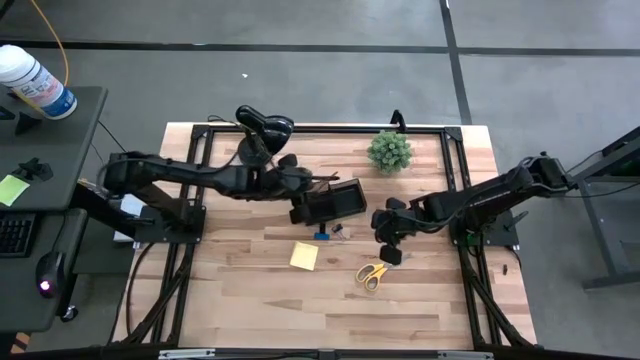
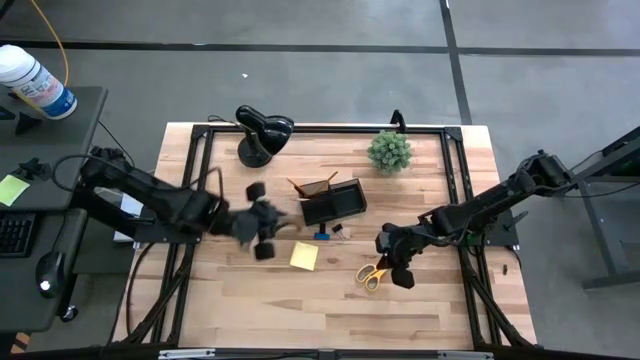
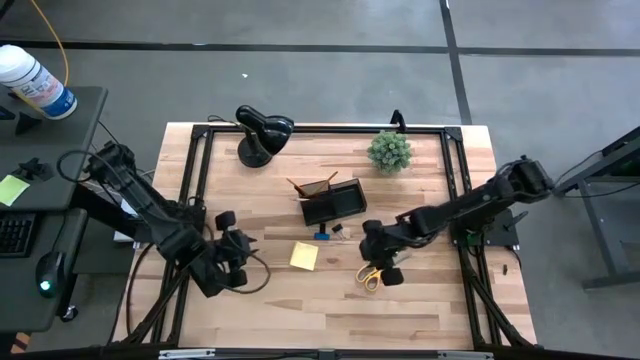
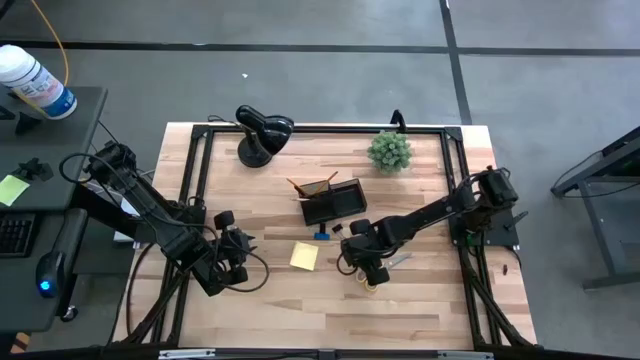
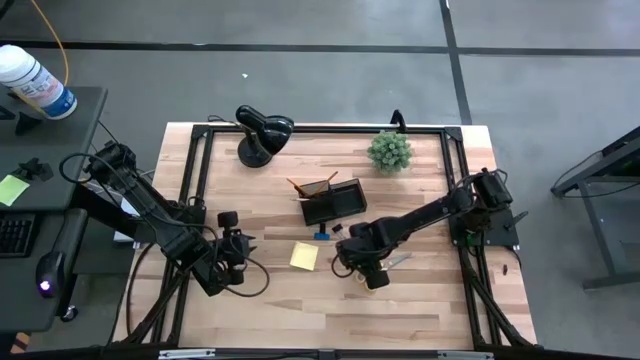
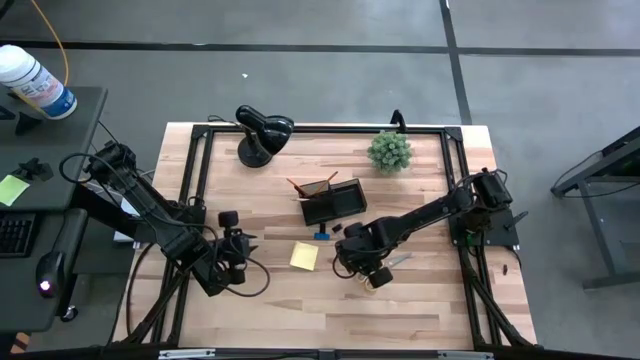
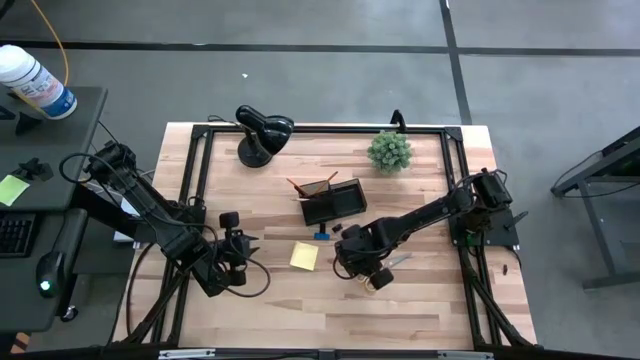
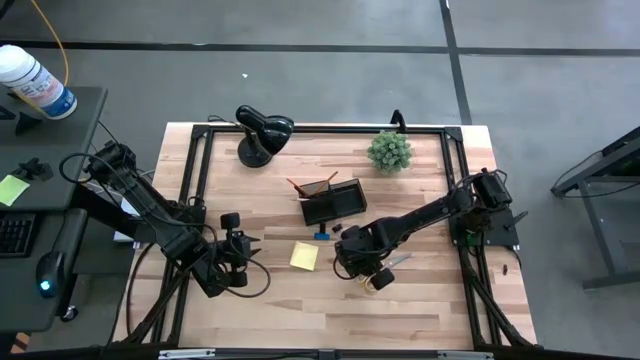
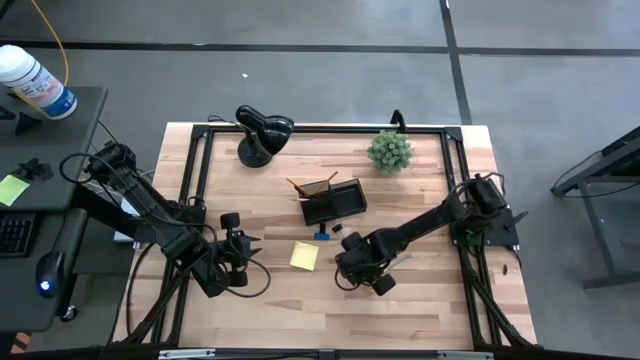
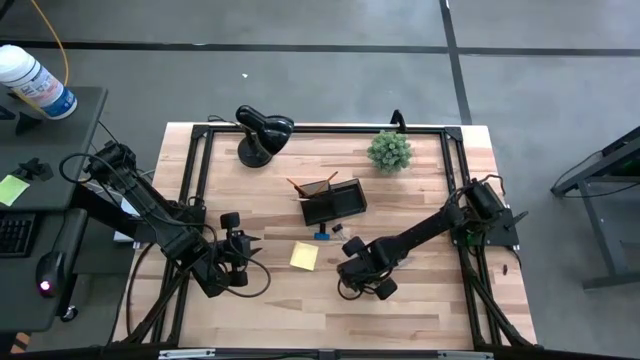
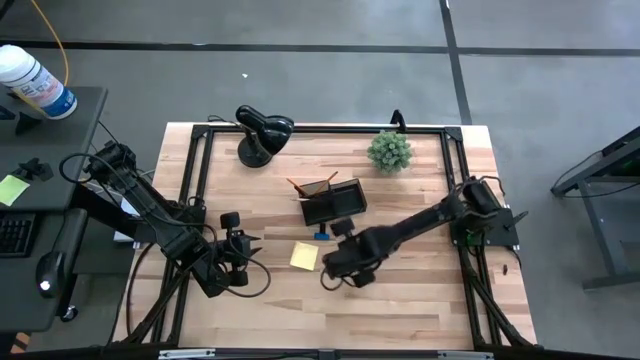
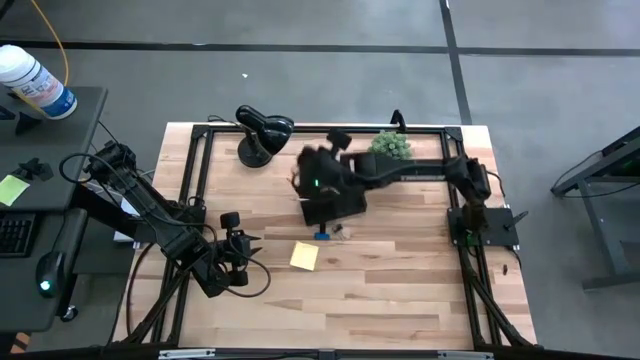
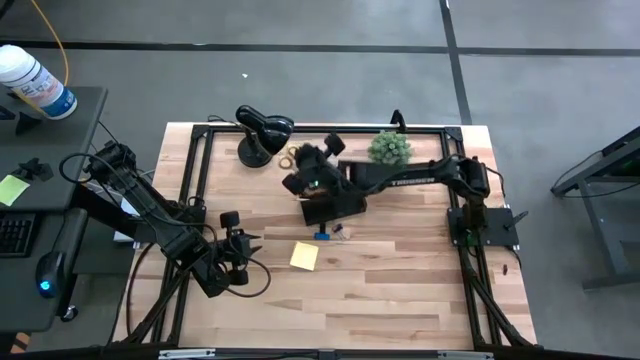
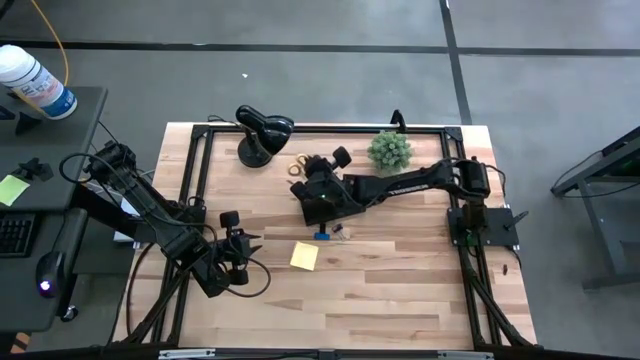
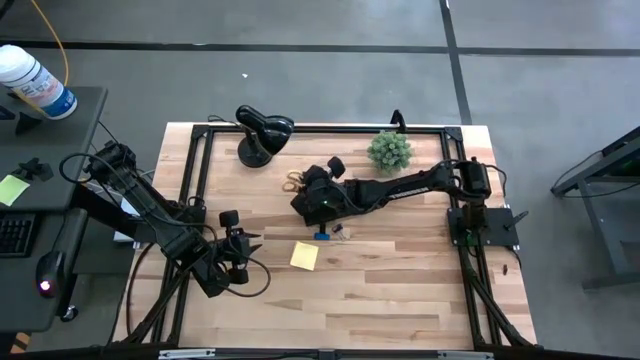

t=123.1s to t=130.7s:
Task: Pick and place office supplies into organizer
Put the yellow scissor into the black desk organizer

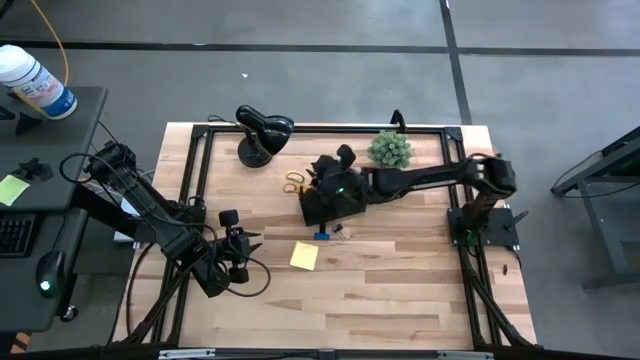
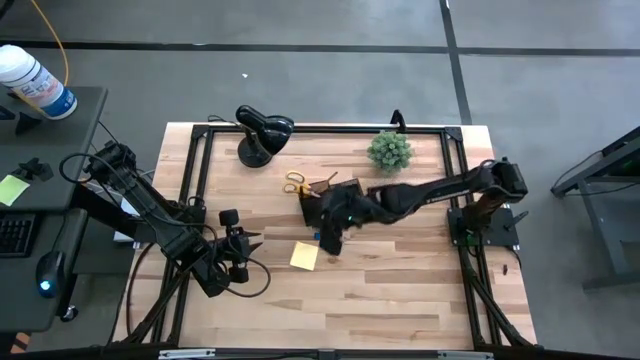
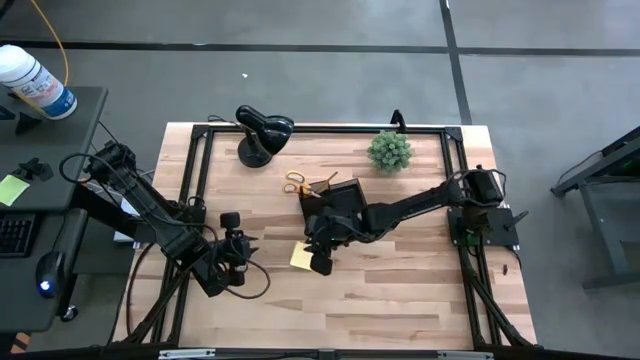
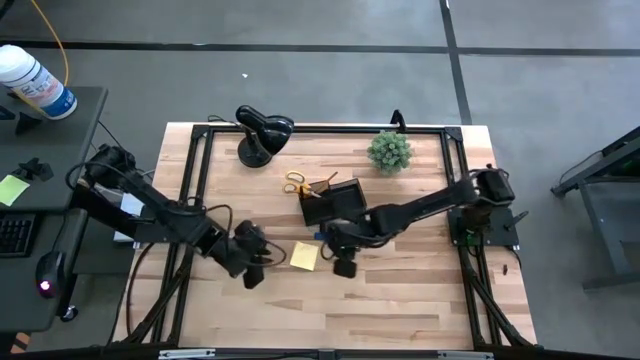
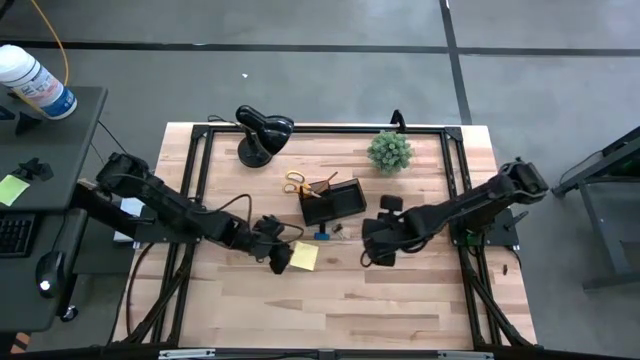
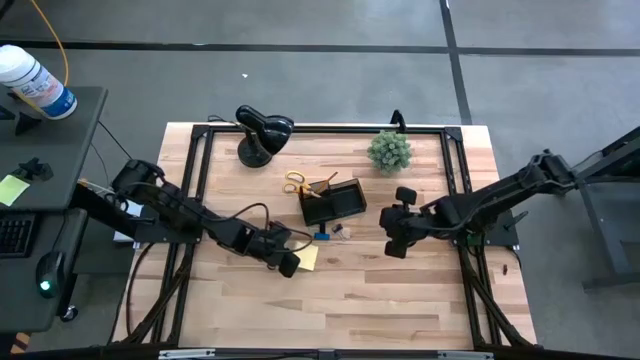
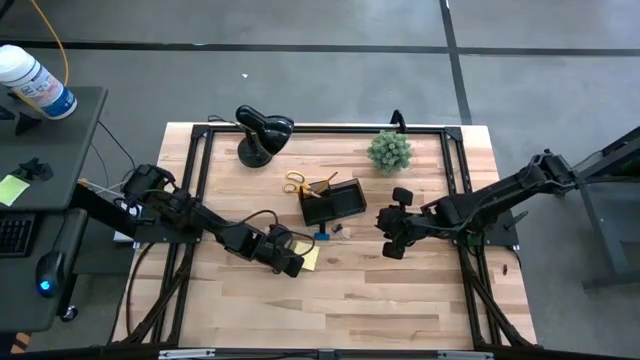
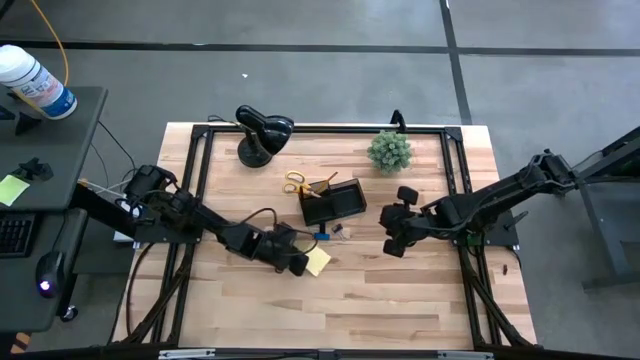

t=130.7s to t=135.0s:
Put the sticky notes into the black desk organizer

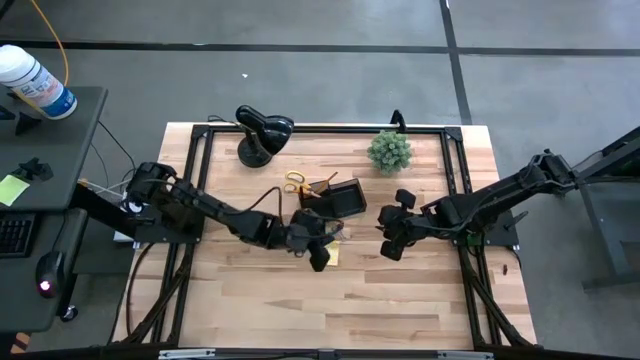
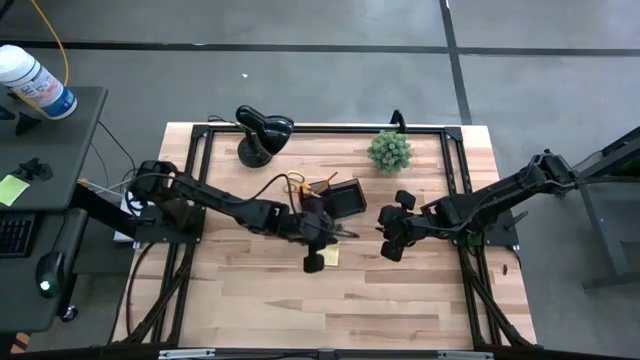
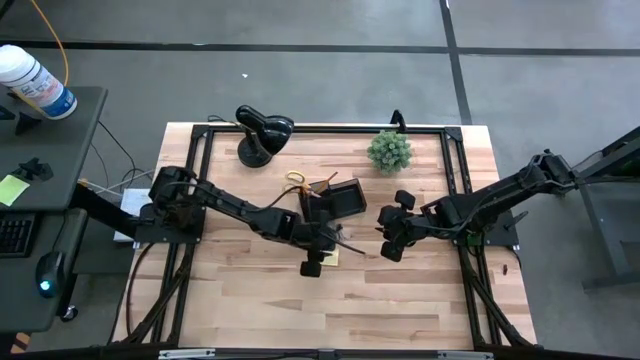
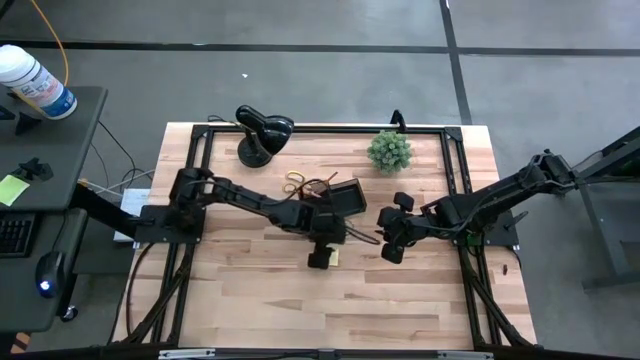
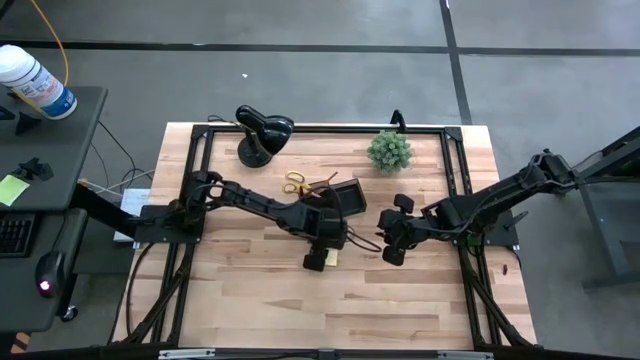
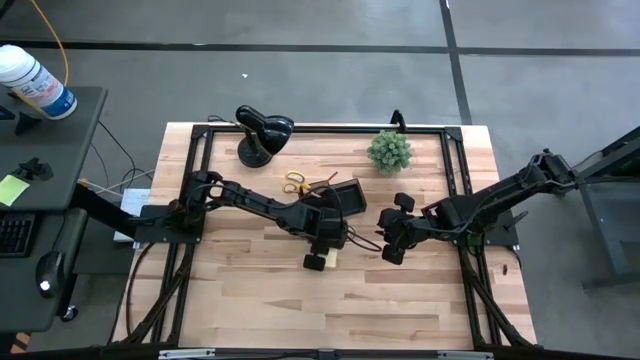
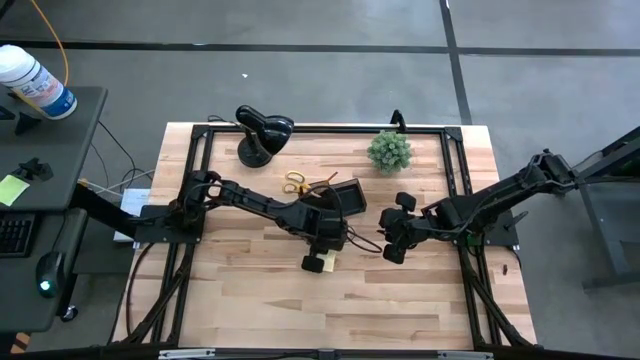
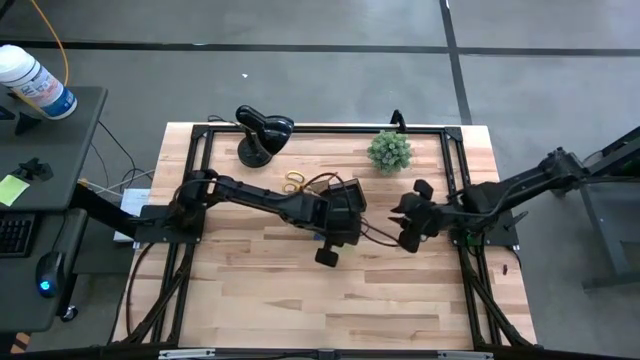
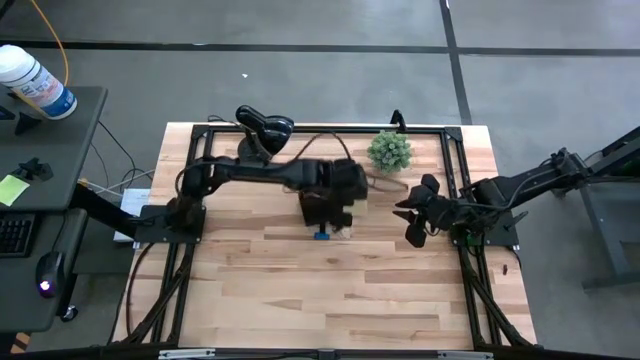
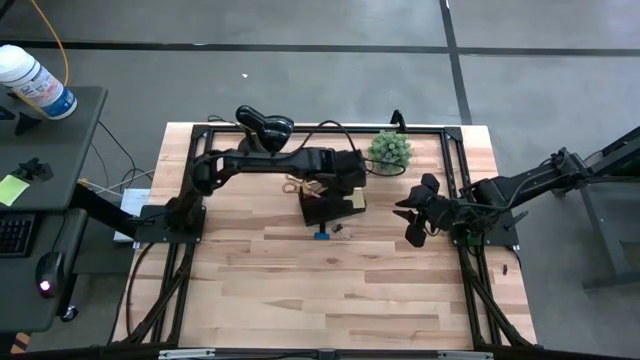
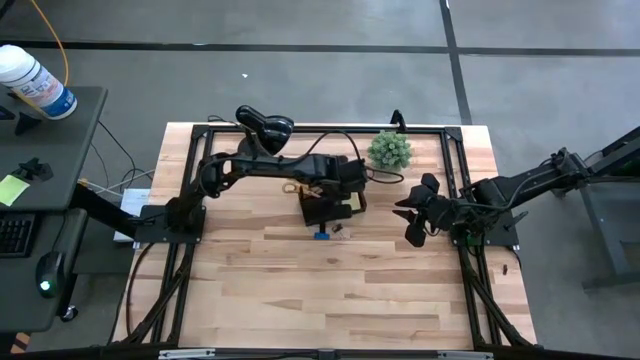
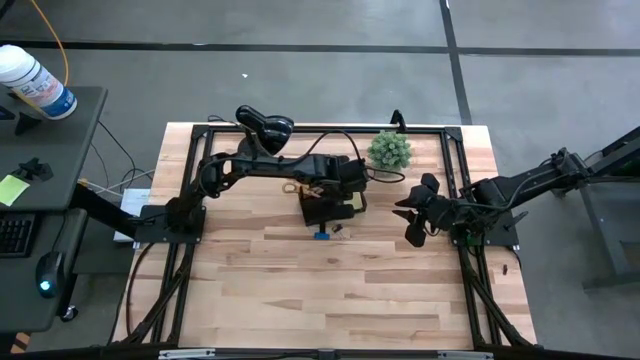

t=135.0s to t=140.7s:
Put the yellow sticky notes into the black desk organizer

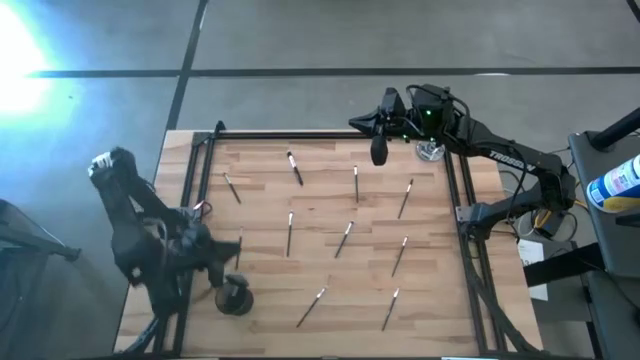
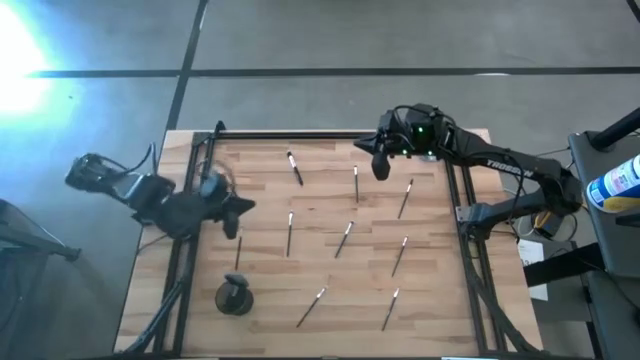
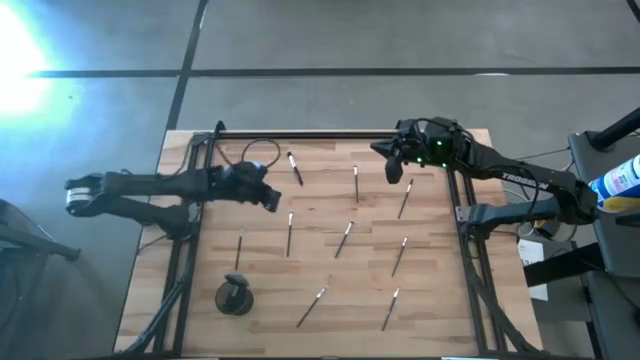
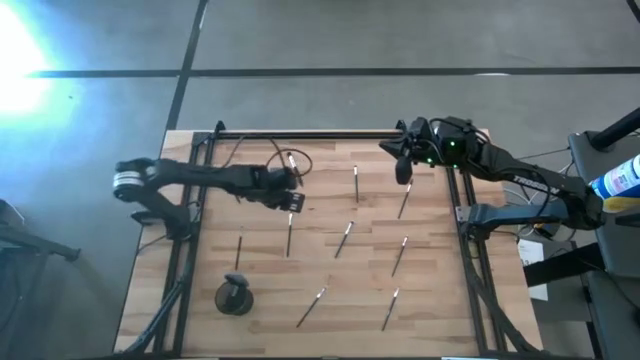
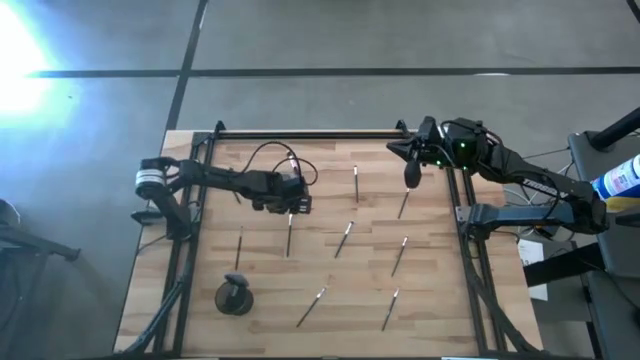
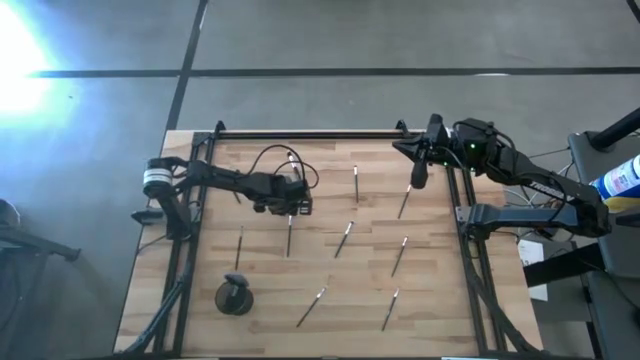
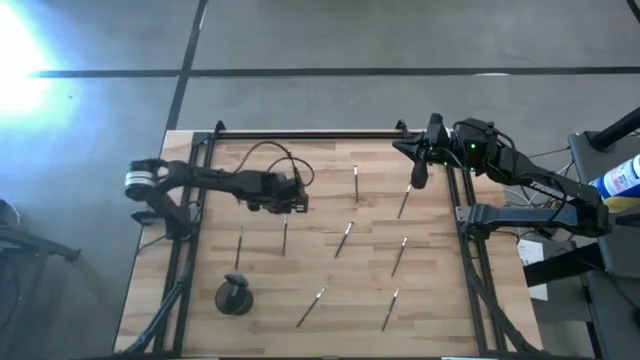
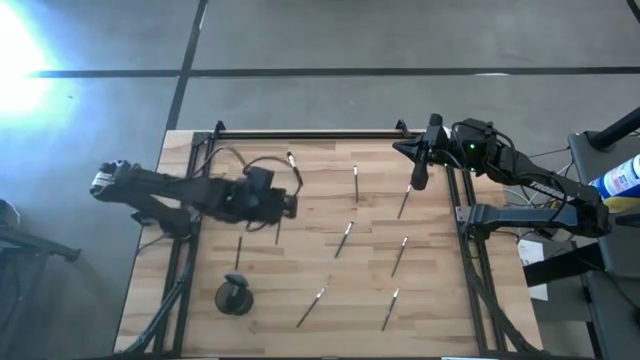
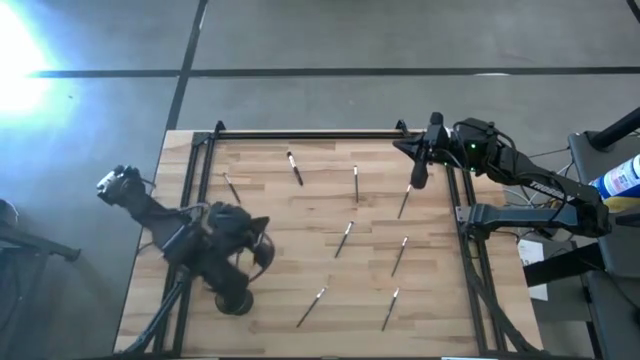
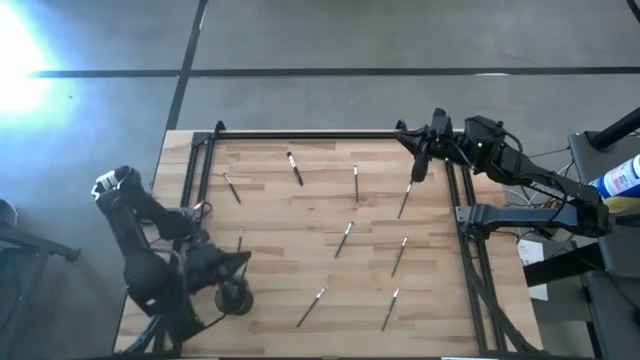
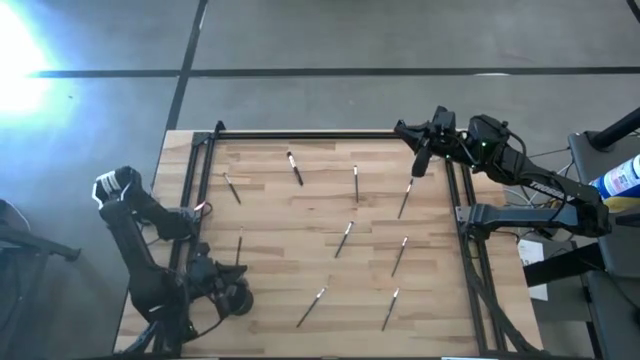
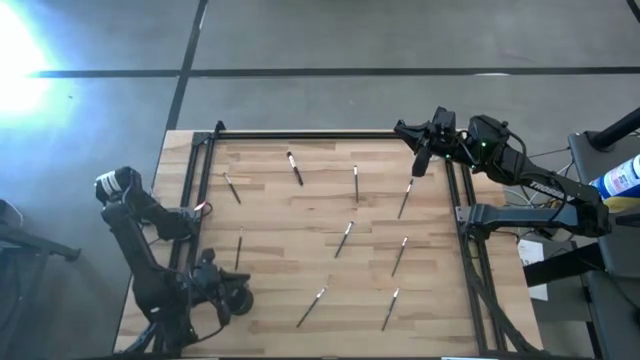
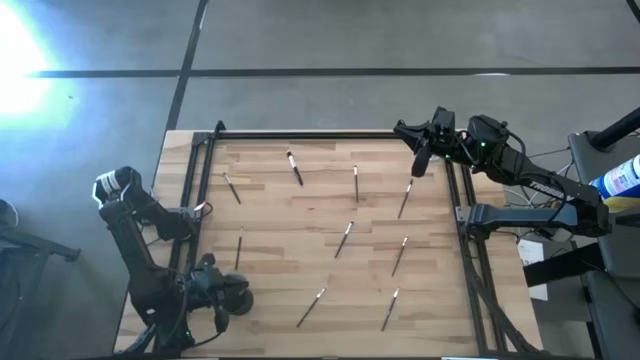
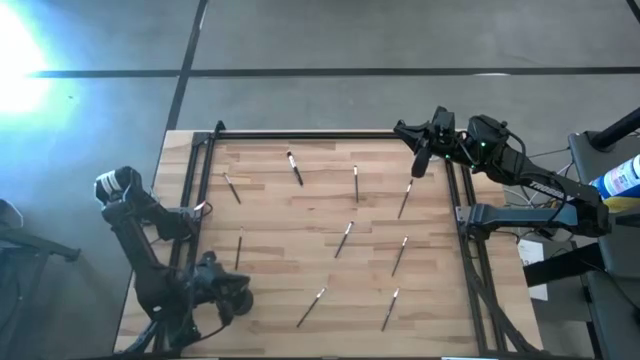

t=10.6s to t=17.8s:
Task: Pick & Place Makeup Brushes
Put the eyeshadow brush into the makeup holder
